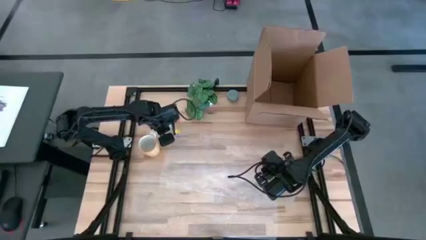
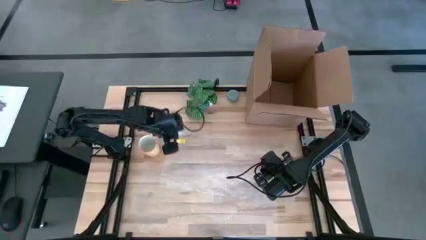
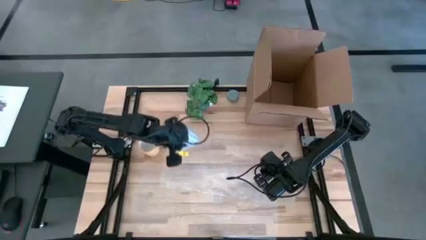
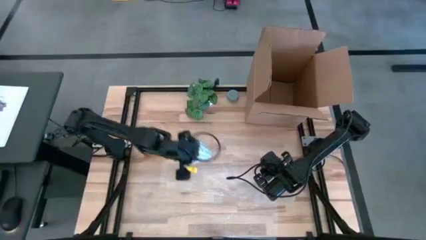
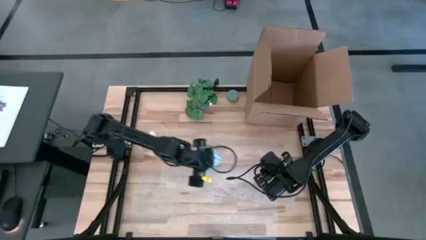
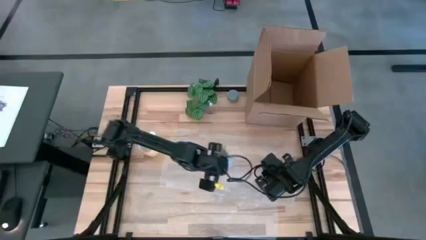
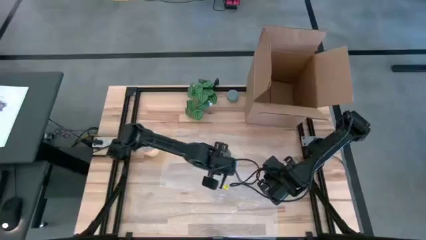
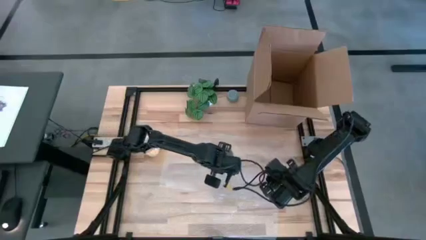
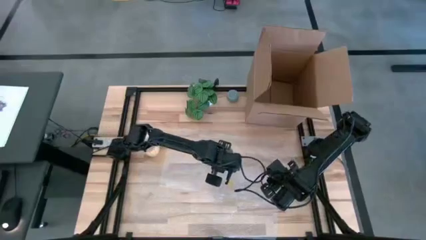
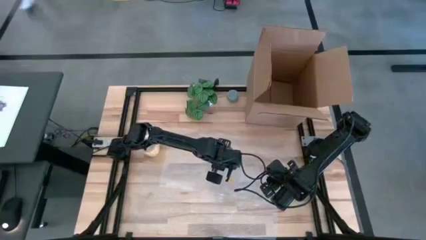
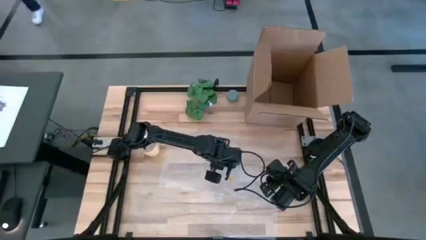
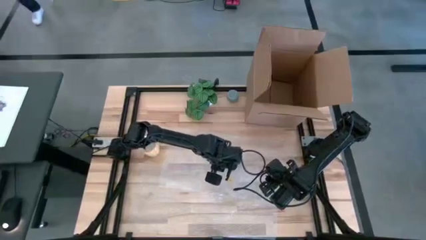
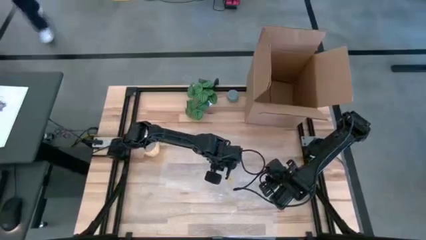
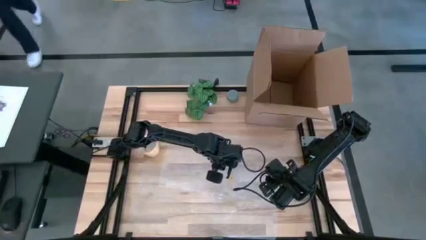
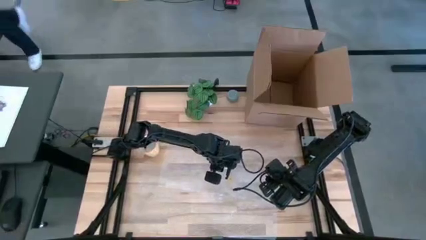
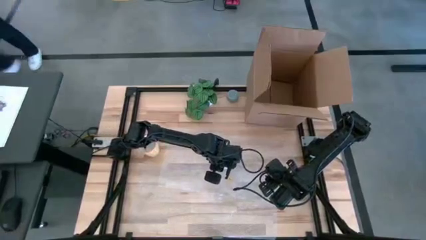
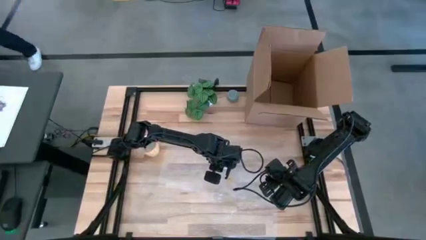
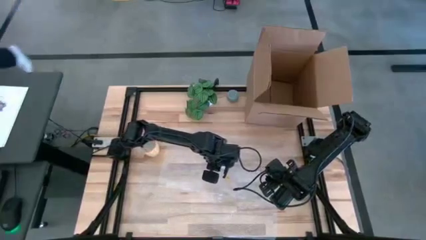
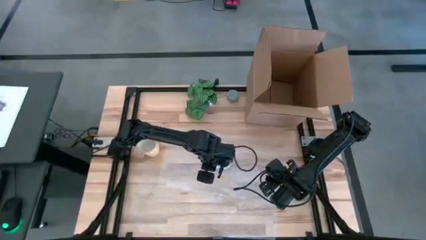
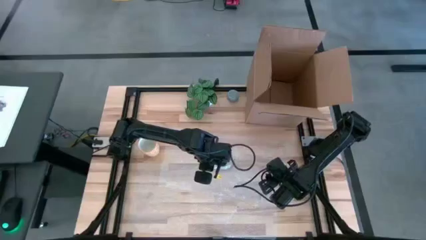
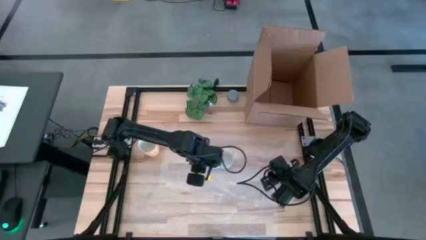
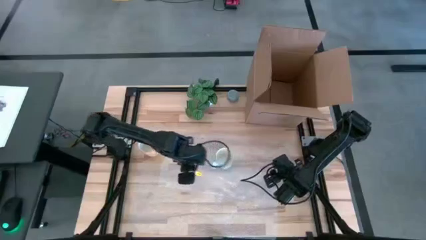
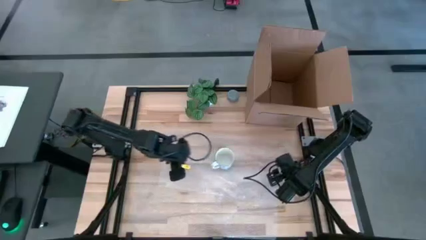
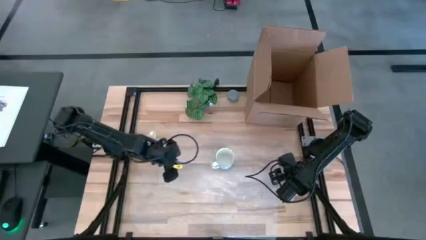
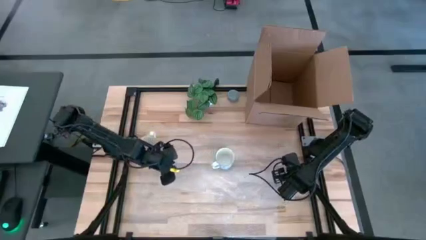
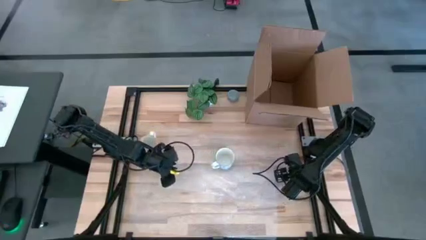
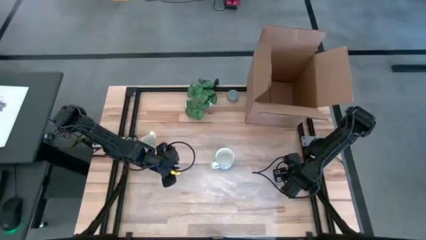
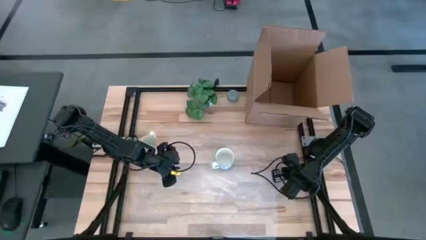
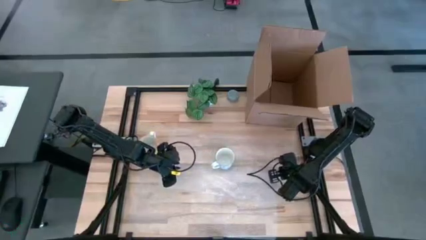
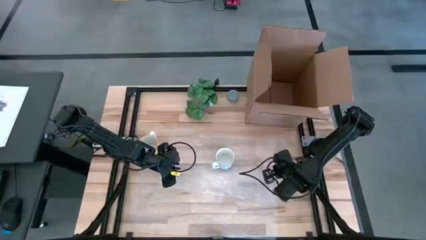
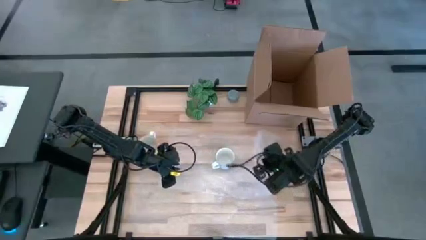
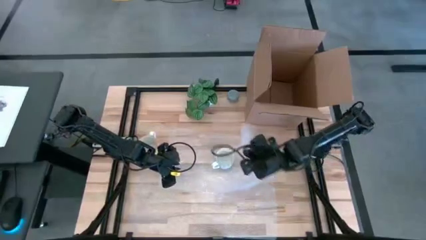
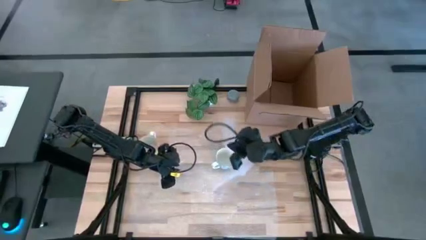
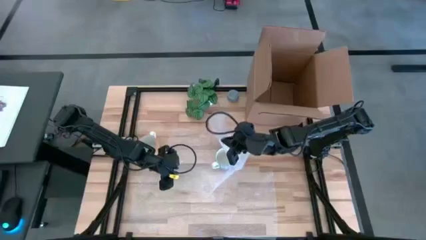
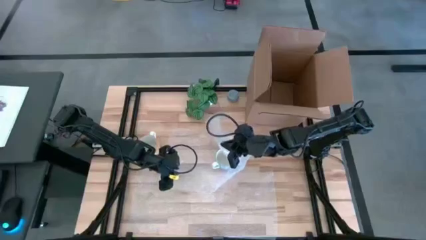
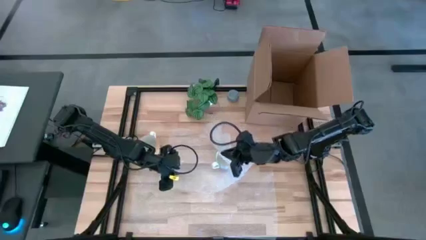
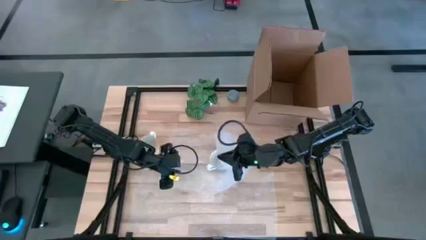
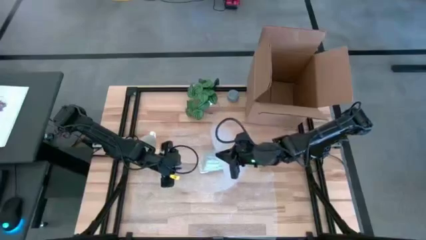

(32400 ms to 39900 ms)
Task: wrap mug
Put the blue cup on the bubble wrap

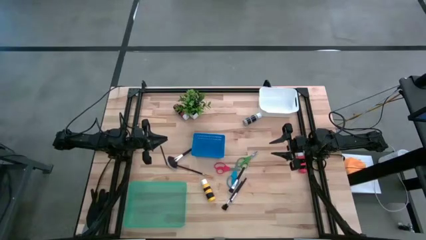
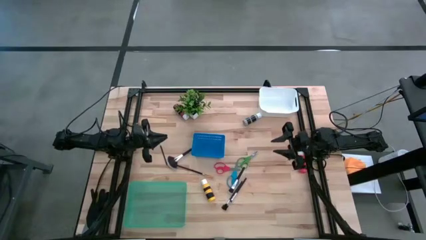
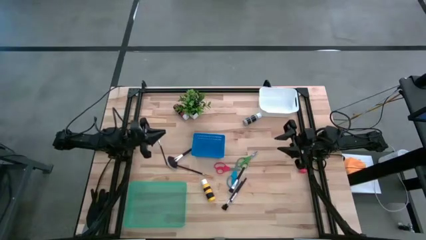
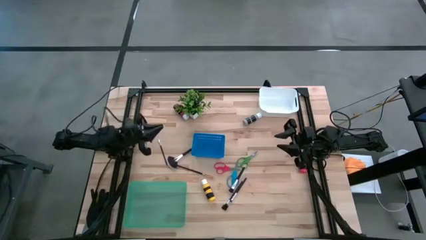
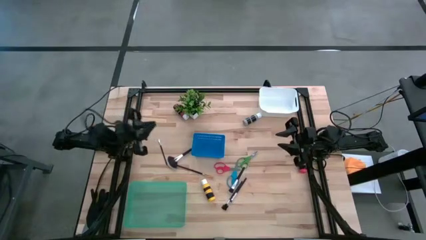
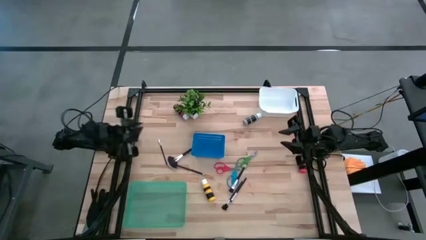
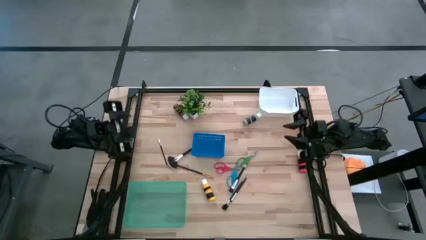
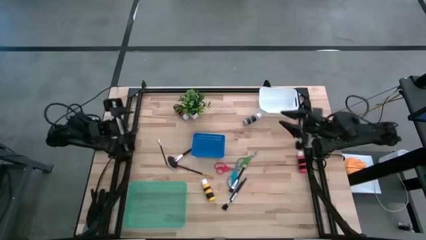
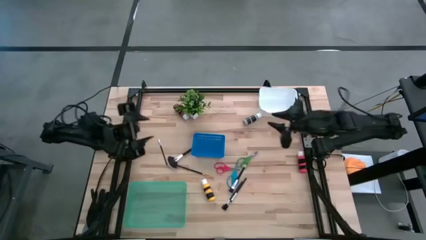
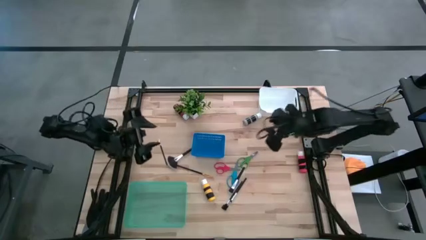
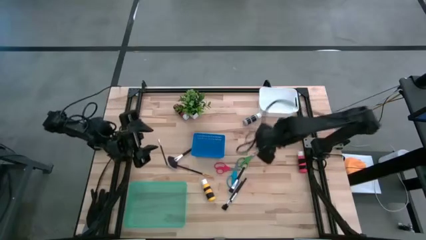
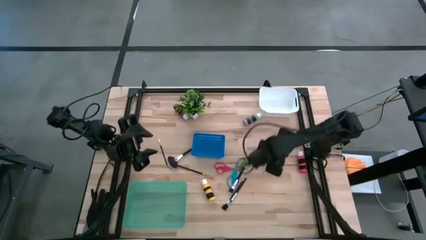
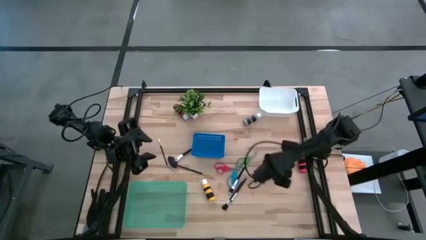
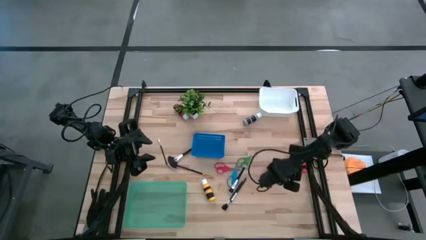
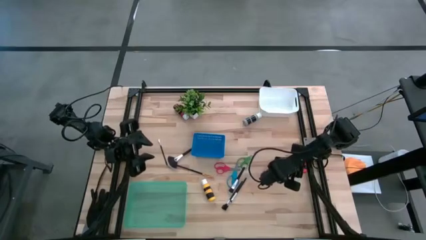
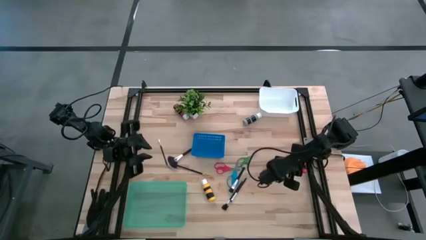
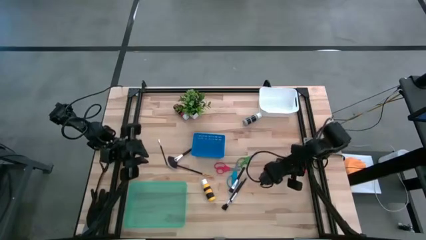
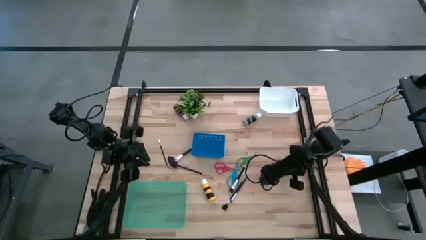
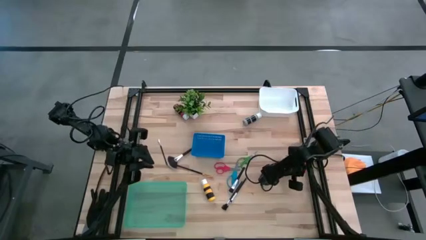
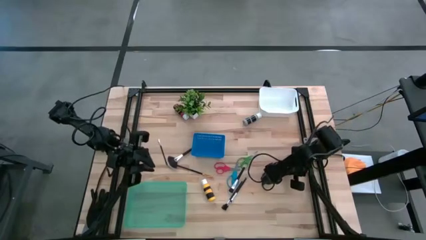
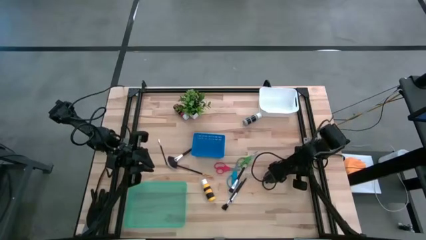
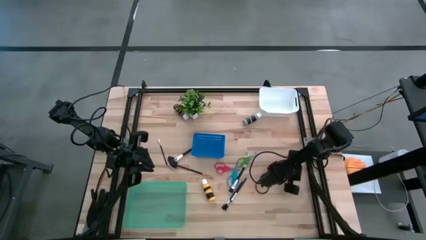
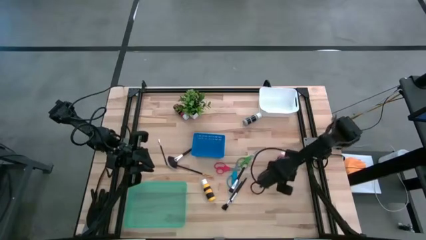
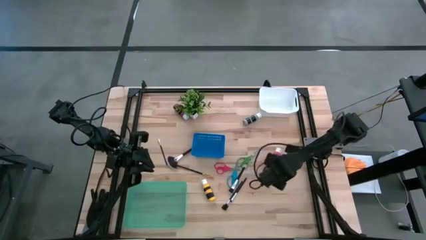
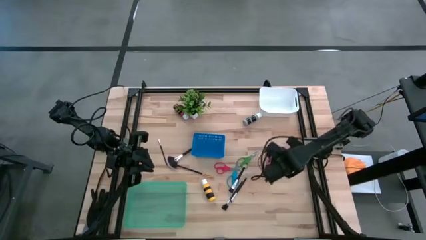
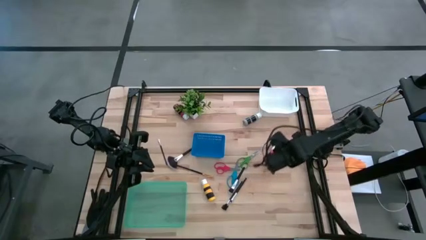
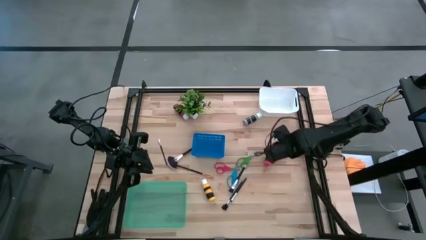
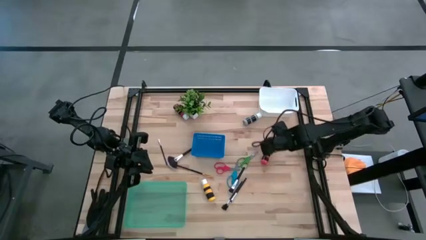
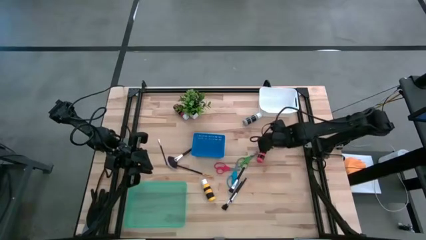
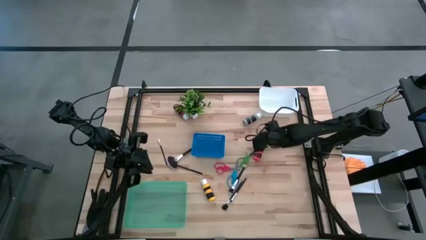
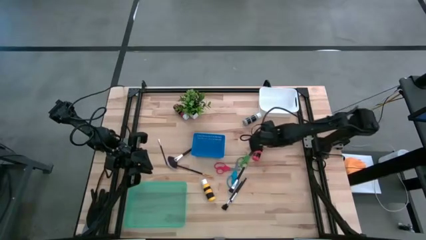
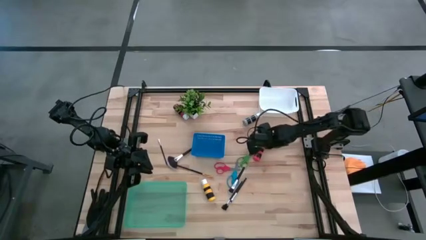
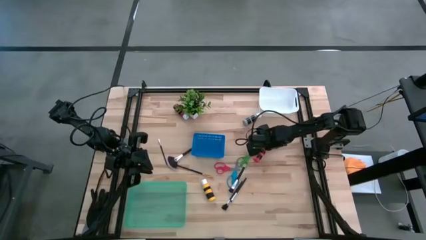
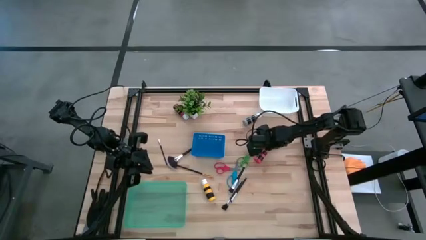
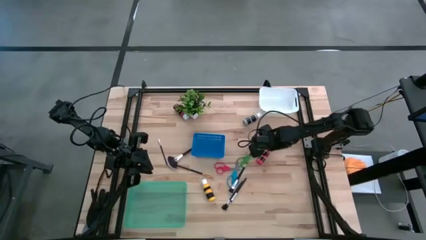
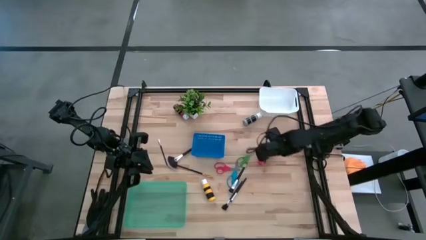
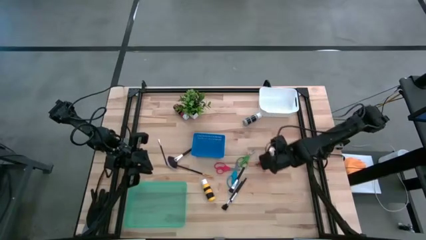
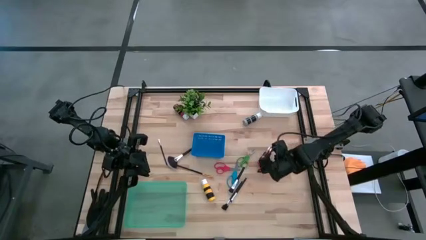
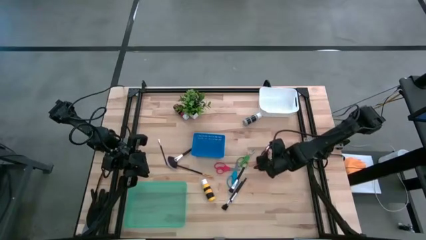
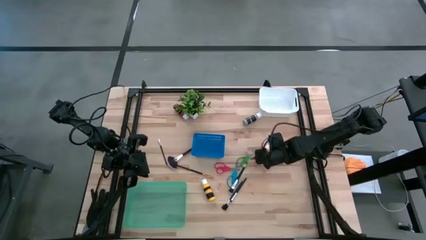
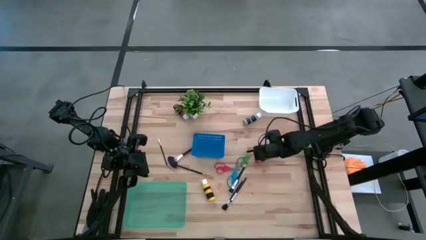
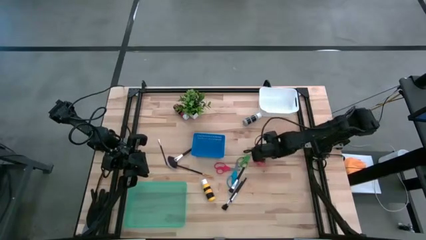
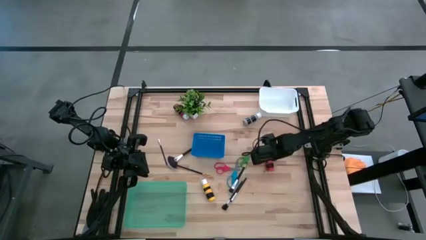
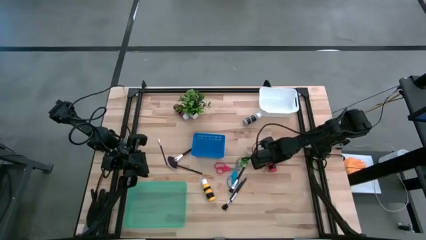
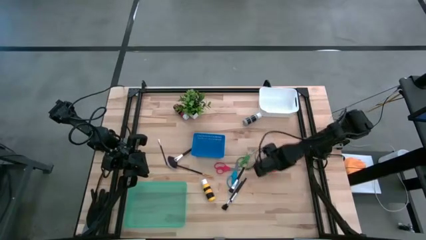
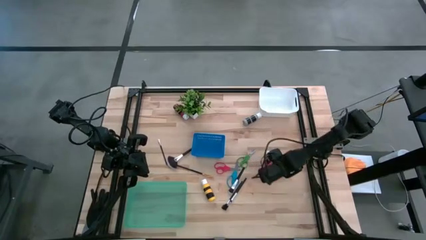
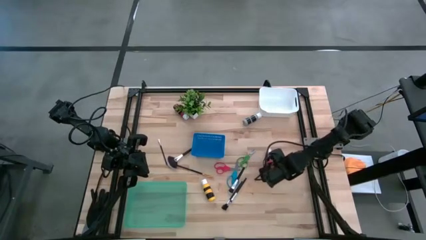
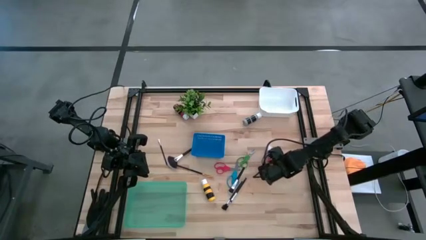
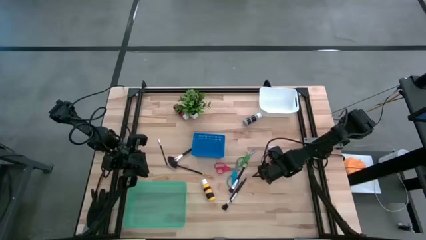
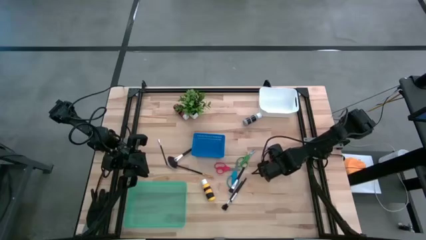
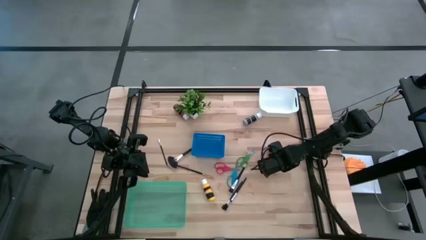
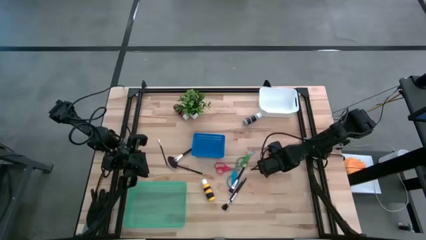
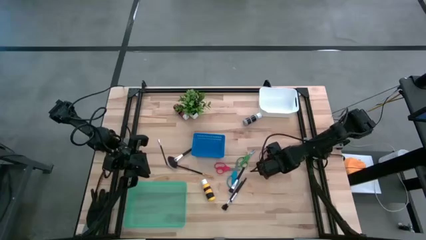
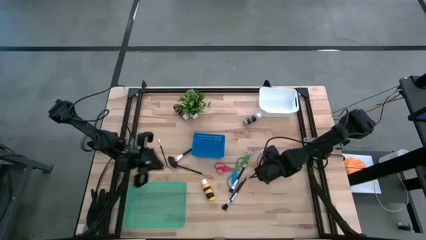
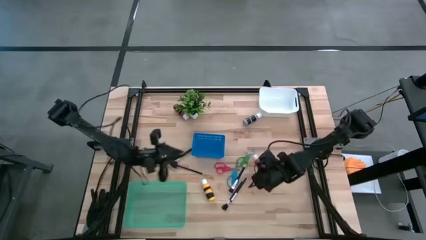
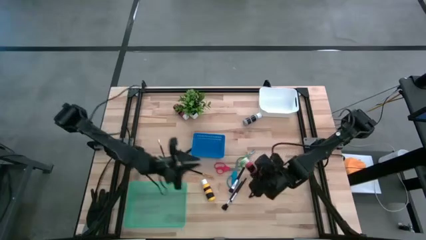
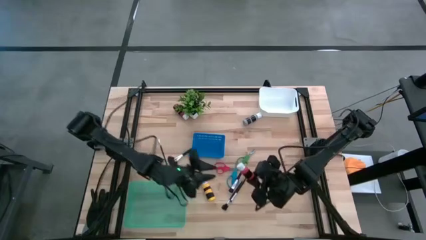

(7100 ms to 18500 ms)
Task: Pick & Place Paint Supplies
Put the orange paint into the blue bin
